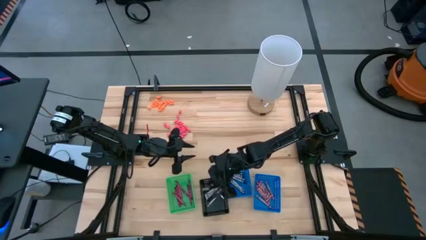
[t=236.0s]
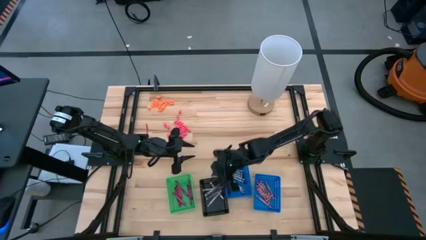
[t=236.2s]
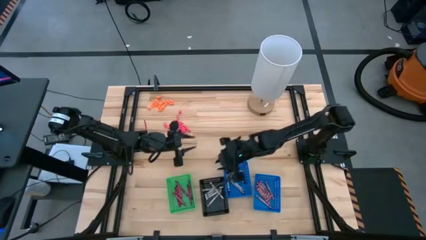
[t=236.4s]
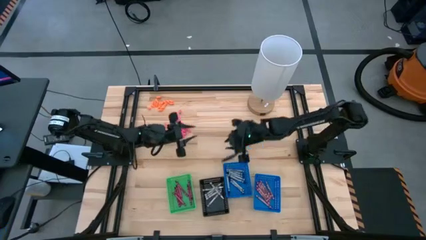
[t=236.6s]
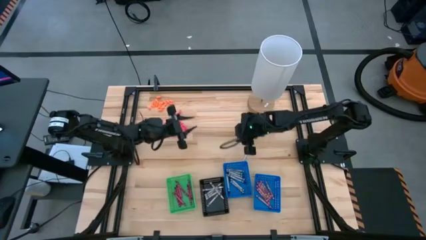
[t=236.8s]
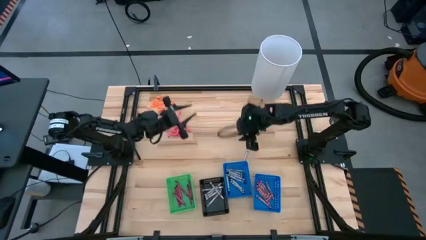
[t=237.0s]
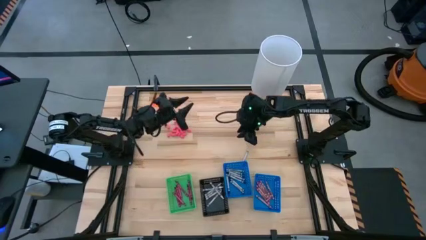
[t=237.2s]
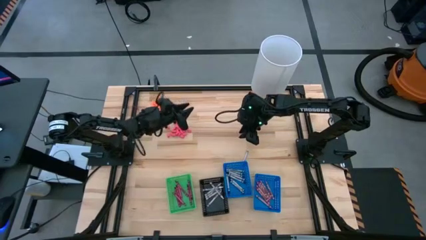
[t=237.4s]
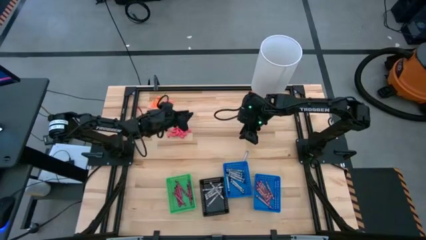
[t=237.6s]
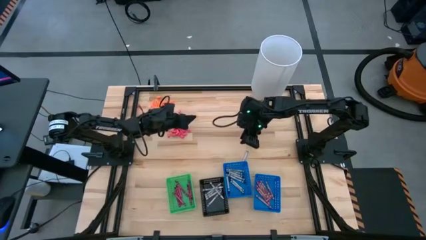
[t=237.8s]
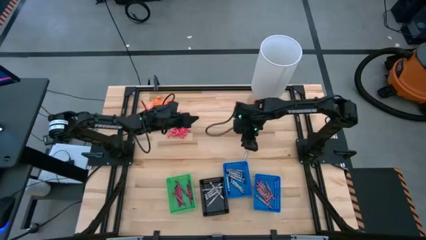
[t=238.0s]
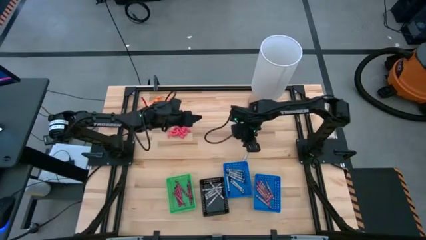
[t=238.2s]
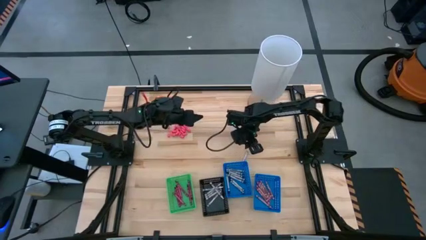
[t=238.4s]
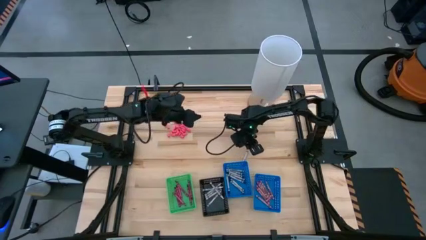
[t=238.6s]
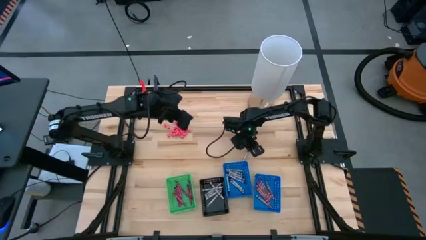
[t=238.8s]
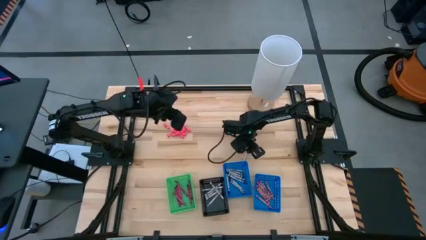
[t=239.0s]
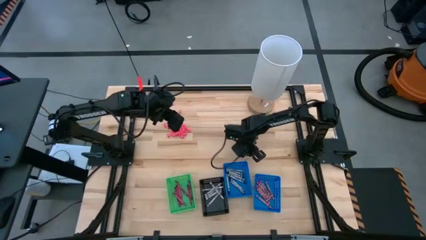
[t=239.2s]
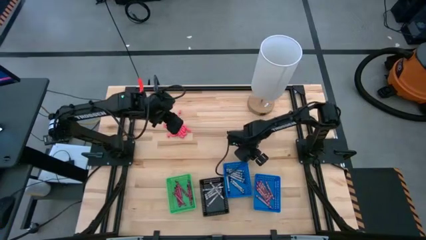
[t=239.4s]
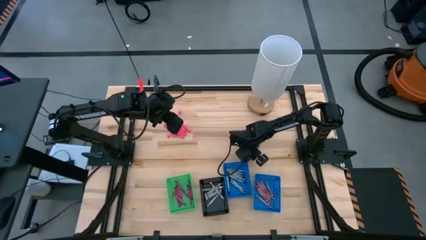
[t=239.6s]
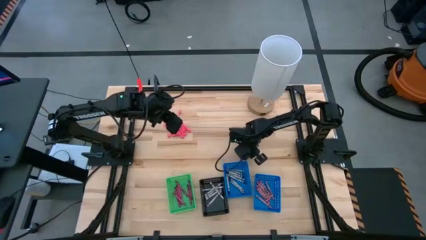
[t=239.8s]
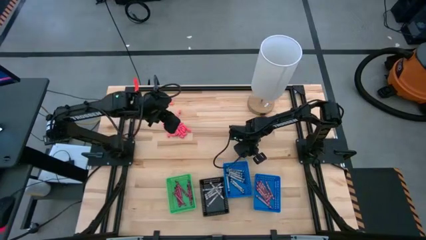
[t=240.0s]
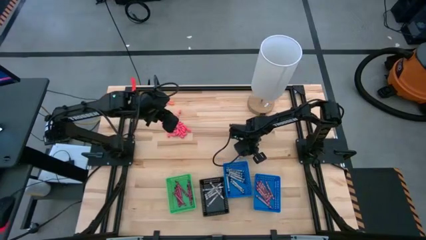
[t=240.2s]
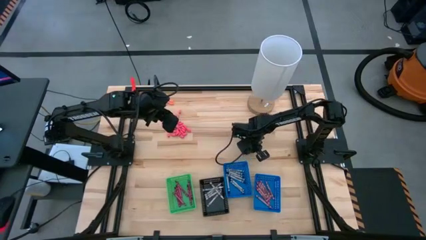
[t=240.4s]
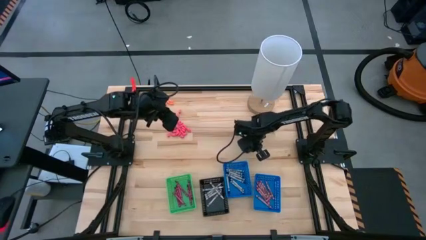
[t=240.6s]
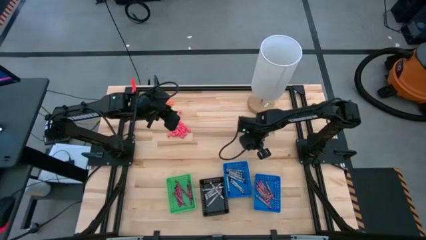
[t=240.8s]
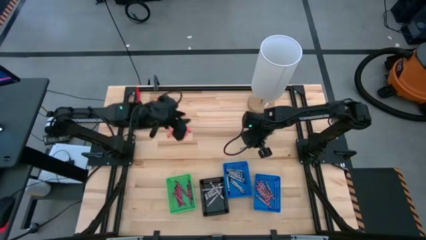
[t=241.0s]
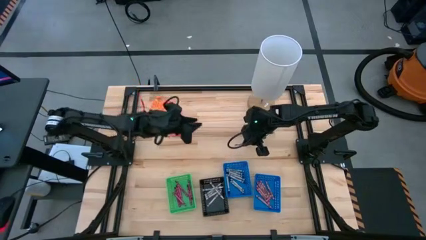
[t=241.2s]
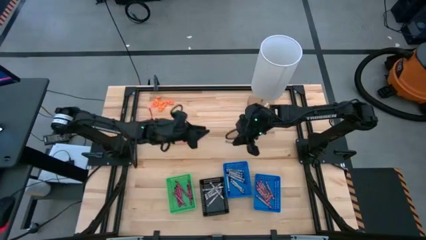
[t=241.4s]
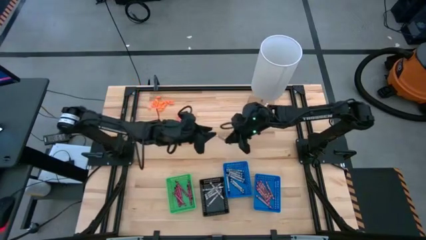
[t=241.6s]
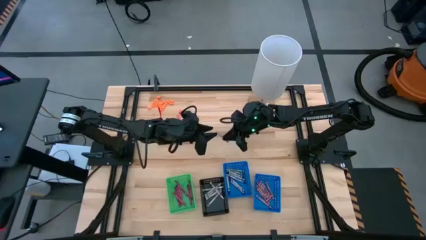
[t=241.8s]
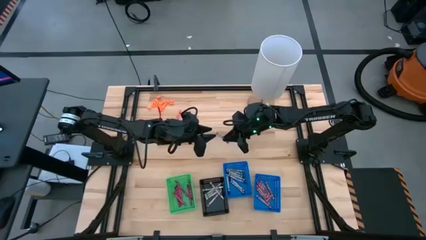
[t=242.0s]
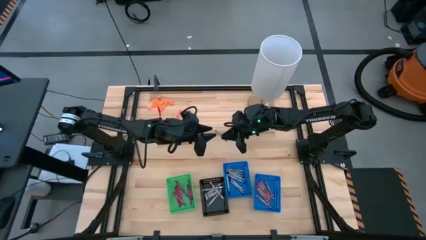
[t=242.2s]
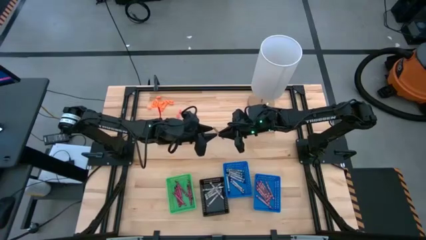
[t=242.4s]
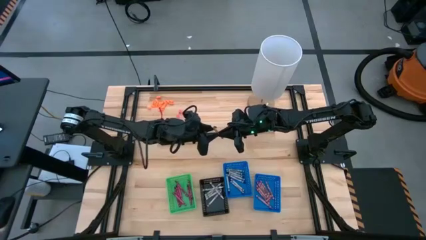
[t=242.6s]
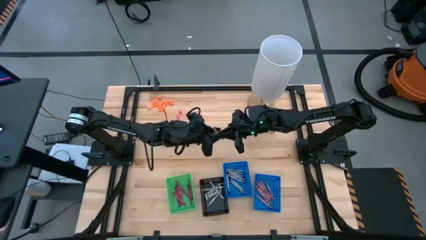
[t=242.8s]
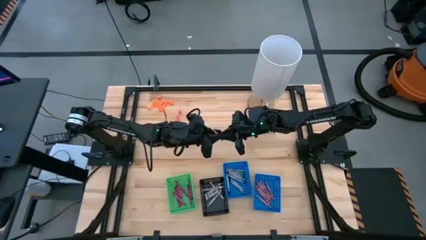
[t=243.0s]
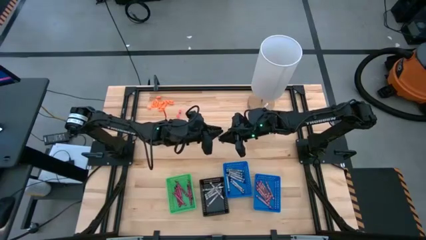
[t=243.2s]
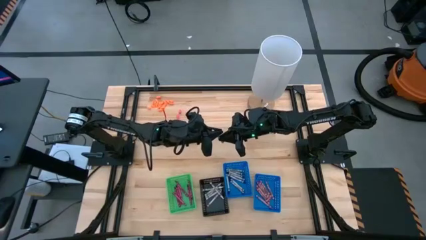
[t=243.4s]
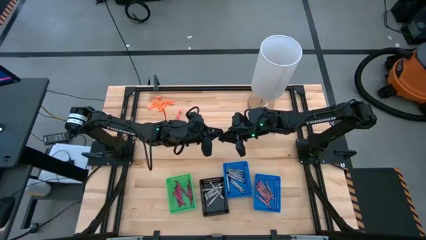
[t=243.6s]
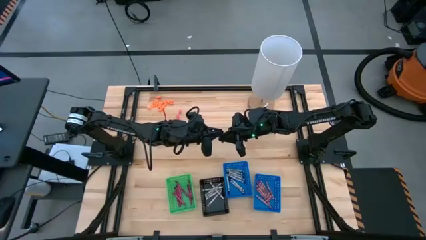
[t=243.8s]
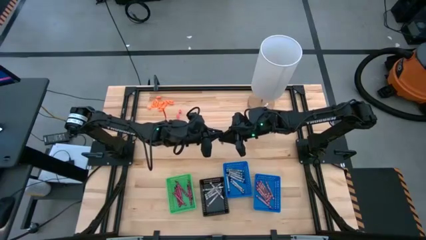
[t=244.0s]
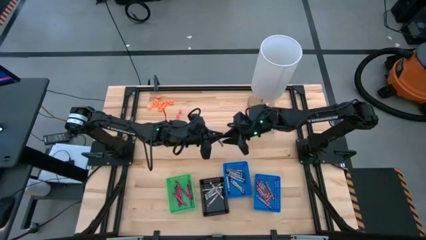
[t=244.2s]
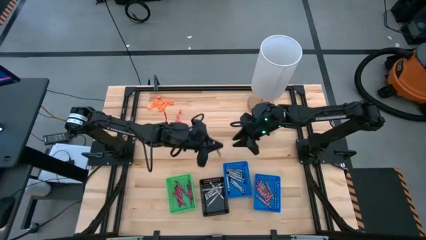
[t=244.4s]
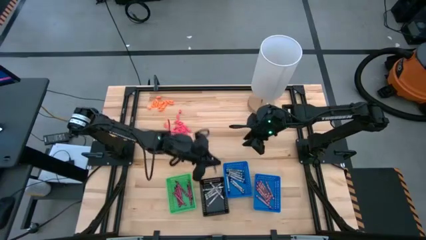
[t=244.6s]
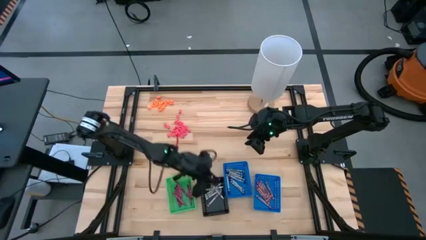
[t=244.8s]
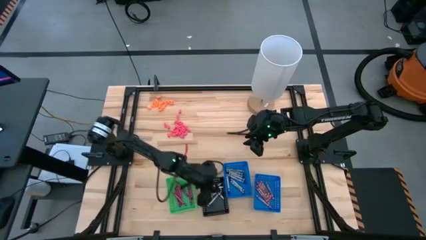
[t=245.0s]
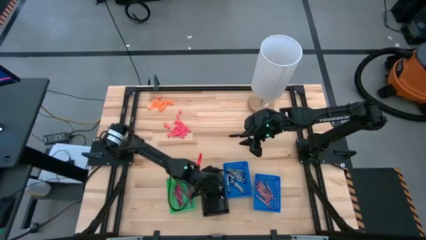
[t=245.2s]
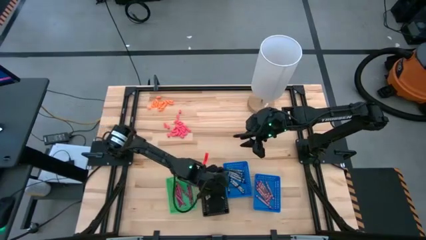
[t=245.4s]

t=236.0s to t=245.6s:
Task: Sort crayons
Put the white crayon into the black bin

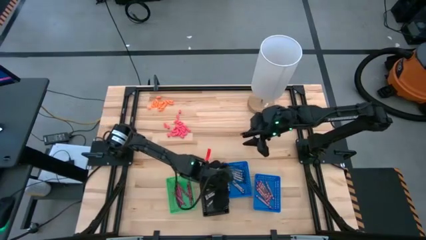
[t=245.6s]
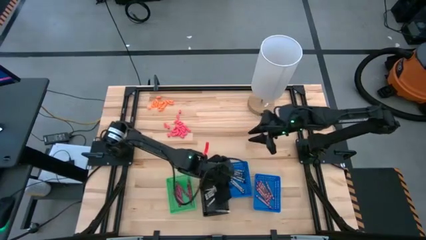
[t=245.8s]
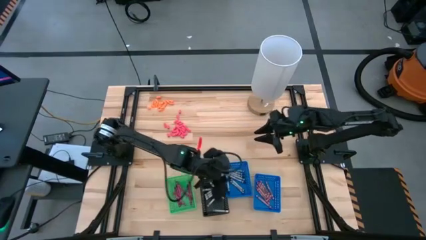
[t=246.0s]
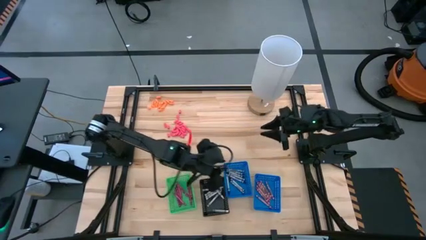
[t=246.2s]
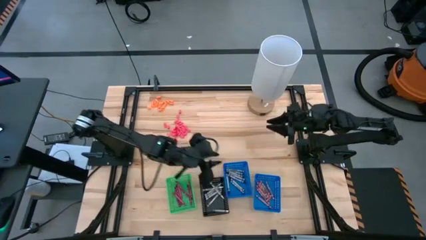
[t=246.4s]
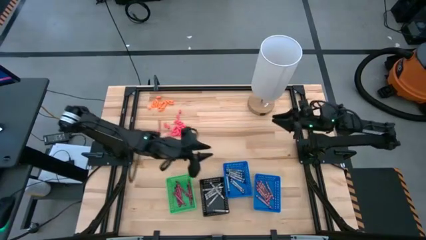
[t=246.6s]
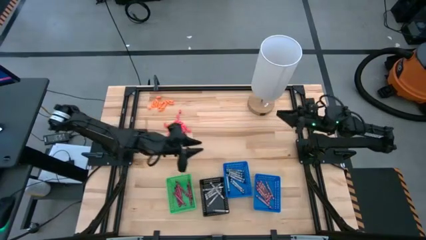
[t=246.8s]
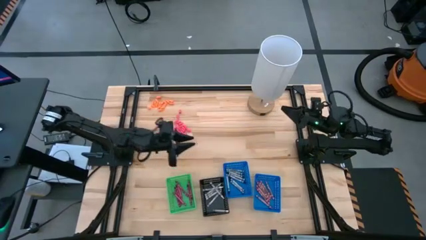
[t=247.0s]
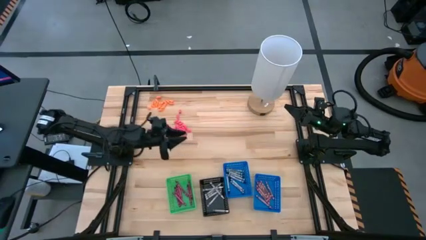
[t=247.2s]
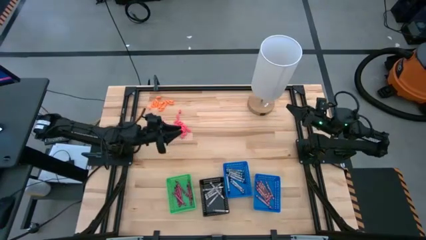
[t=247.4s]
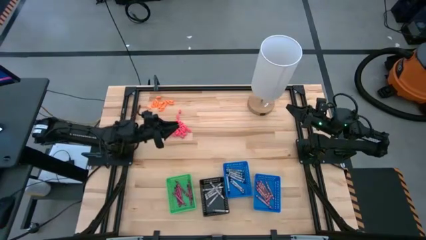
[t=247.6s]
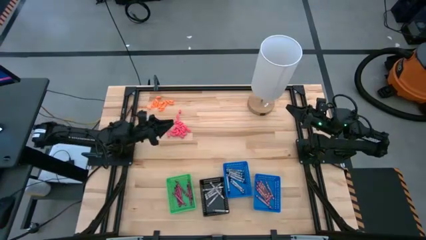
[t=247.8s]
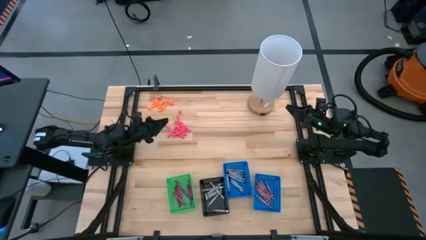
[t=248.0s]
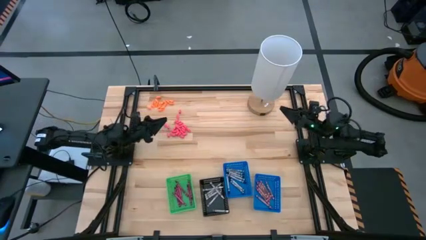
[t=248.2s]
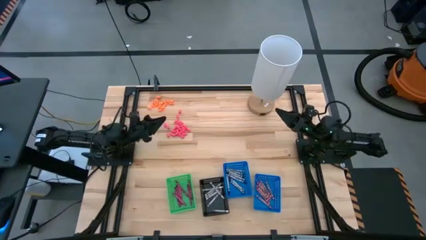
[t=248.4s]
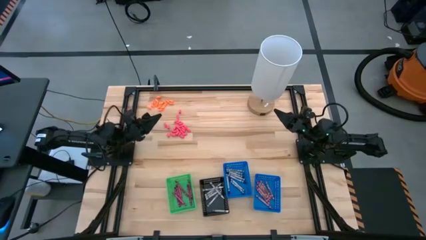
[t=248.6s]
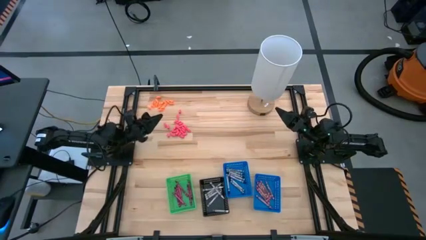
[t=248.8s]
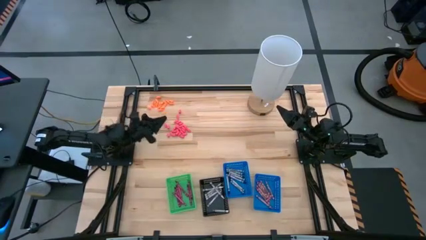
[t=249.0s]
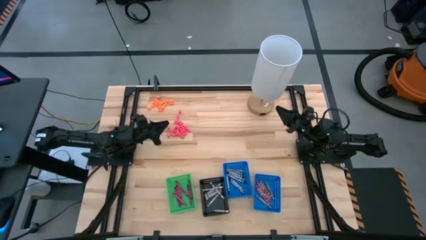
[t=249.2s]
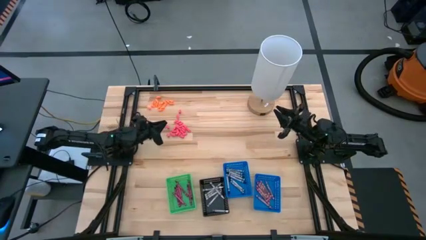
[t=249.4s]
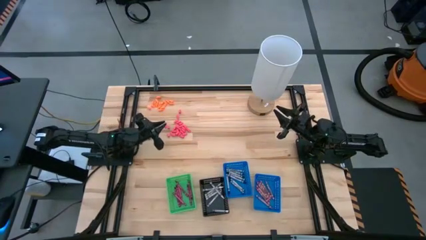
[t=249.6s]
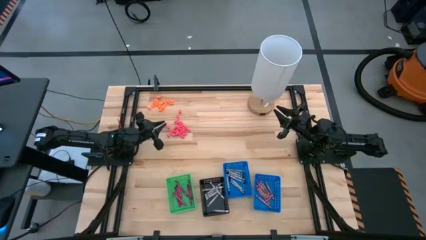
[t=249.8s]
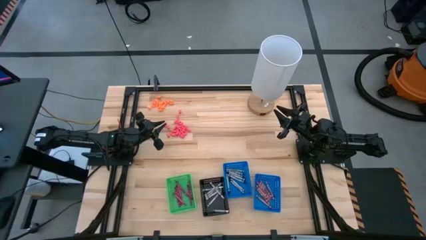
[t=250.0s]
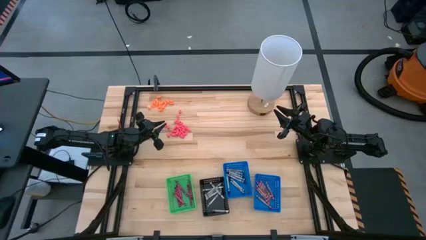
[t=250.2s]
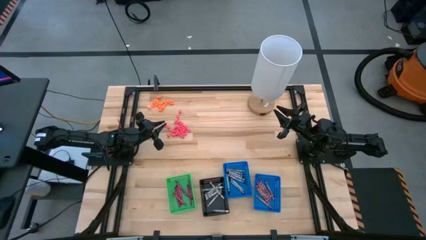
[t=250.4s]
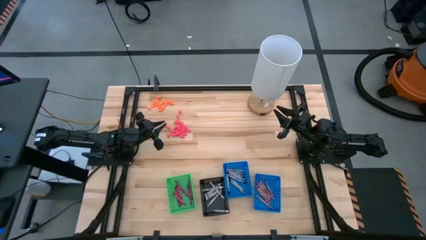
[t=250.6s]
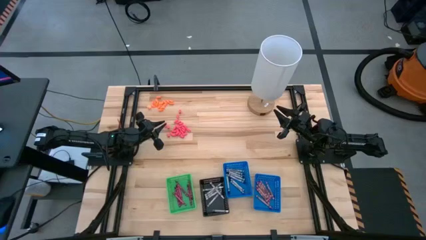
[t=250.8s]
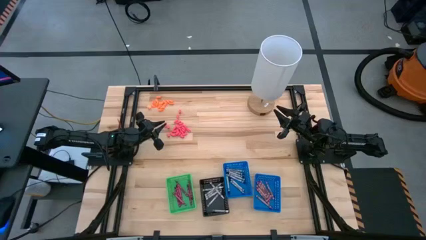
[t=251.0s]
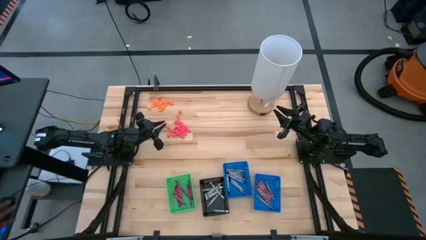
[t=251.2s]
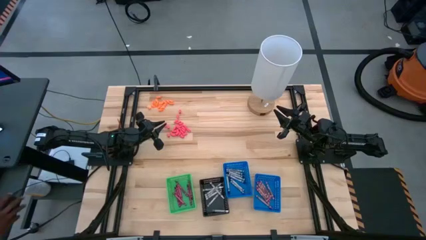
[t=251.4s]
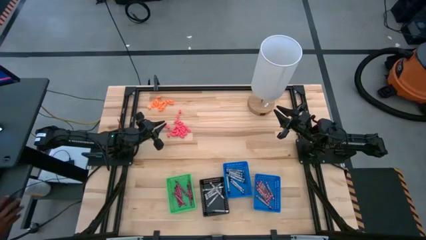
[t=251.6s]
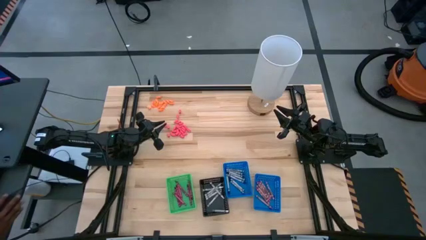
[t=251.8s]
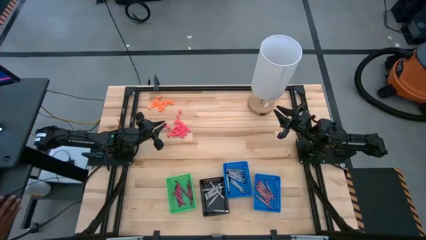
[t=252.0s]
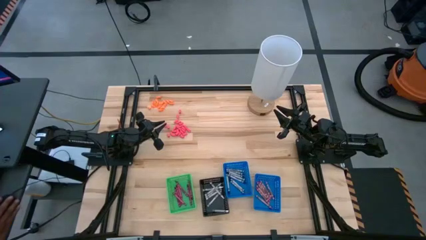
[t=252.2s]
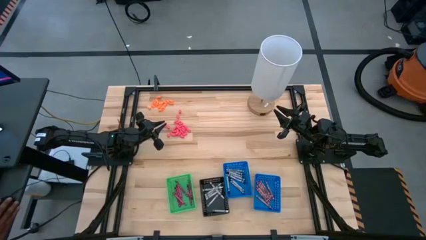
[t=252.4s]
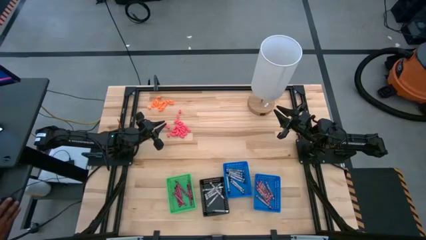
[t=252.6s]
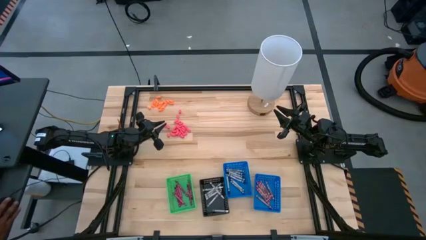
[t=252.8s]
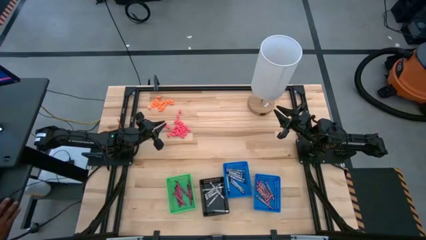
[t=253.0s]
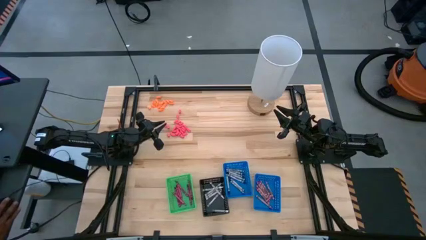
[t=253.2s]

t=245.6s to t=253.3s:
Return to Home Position
